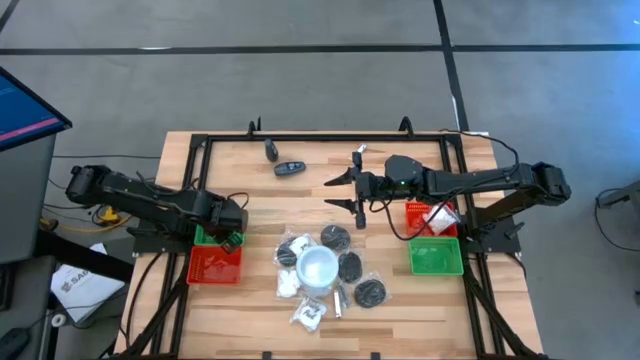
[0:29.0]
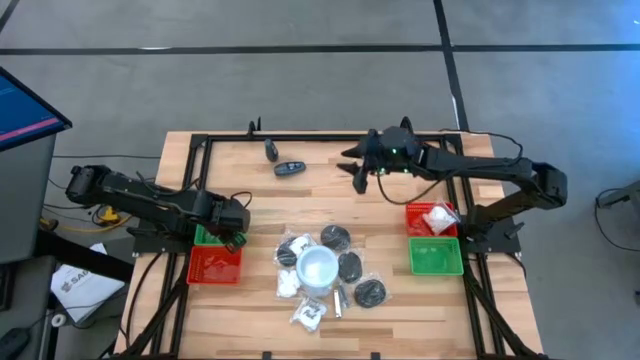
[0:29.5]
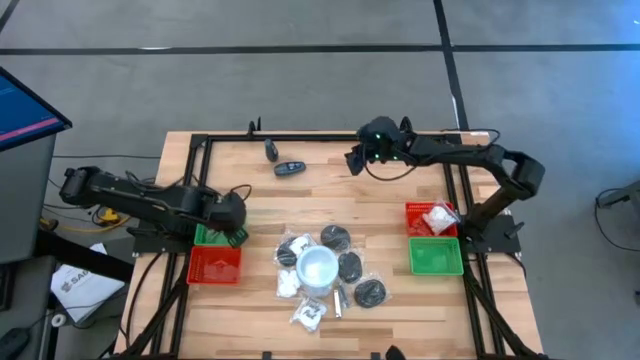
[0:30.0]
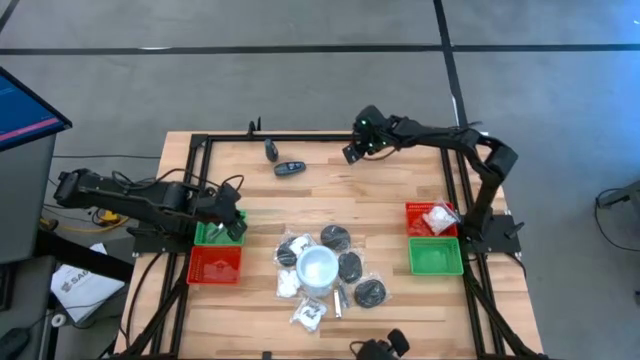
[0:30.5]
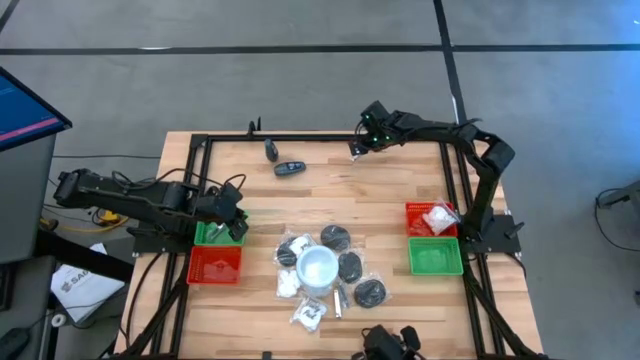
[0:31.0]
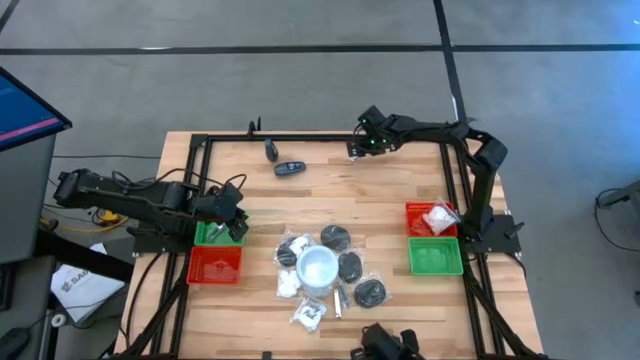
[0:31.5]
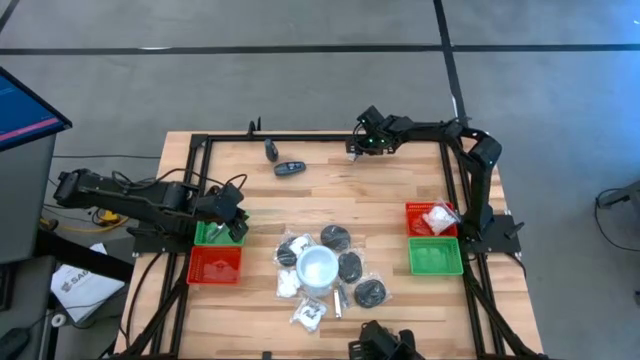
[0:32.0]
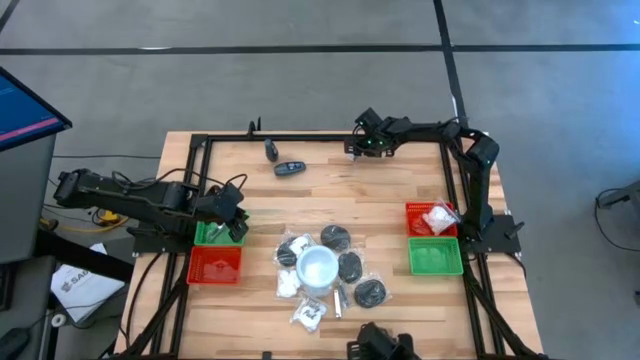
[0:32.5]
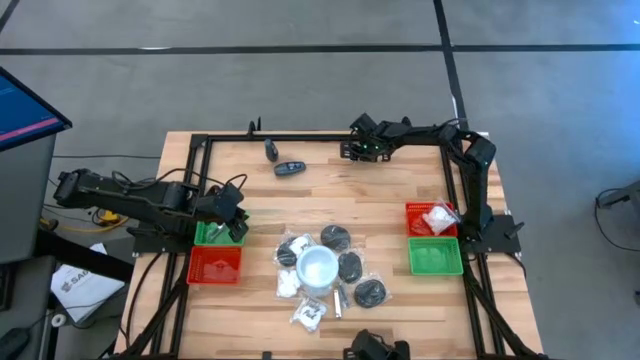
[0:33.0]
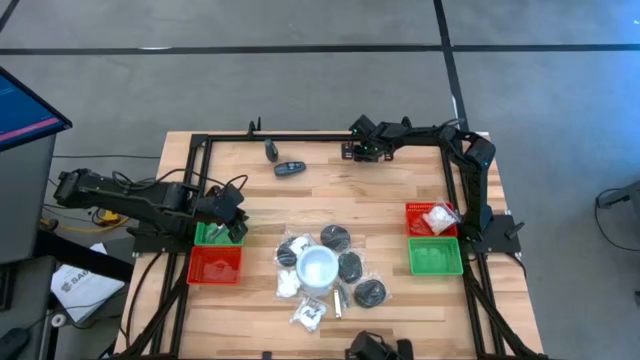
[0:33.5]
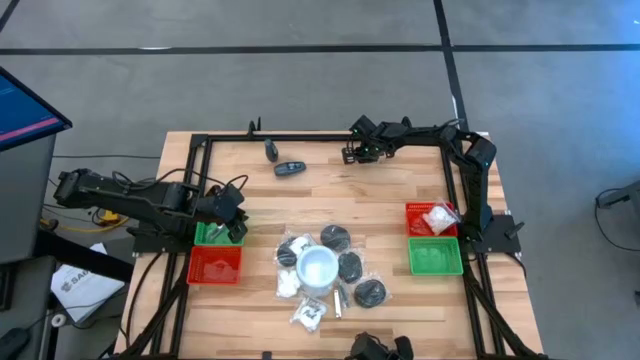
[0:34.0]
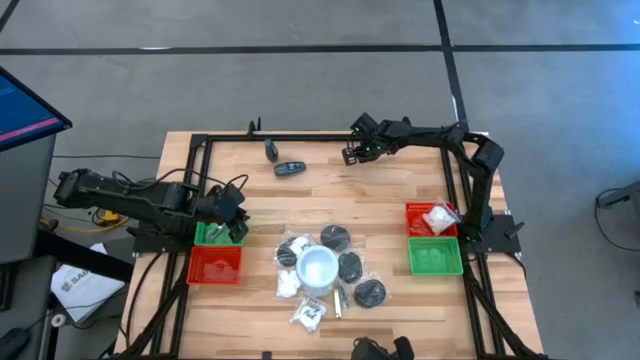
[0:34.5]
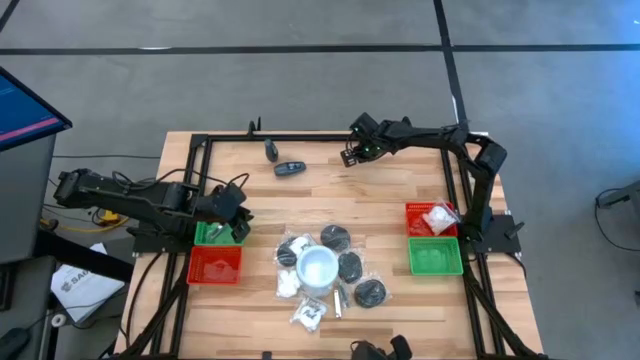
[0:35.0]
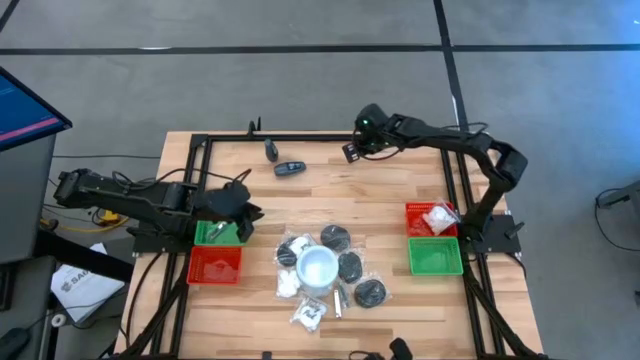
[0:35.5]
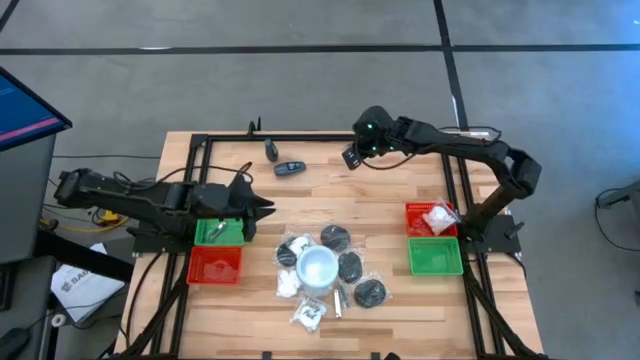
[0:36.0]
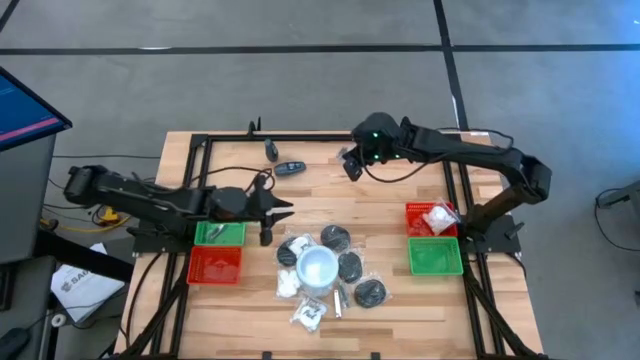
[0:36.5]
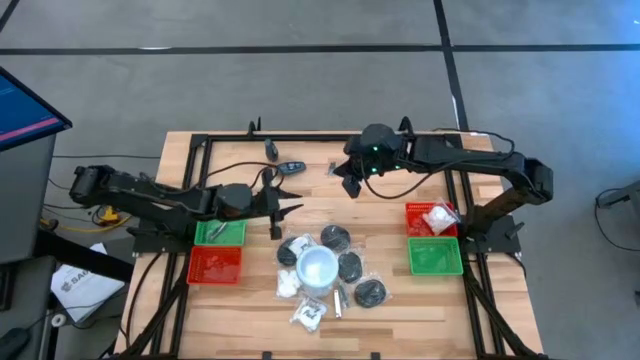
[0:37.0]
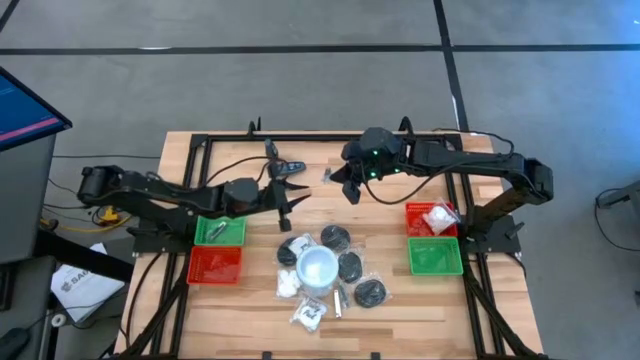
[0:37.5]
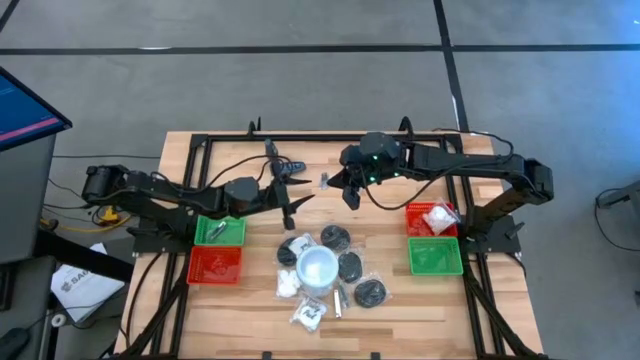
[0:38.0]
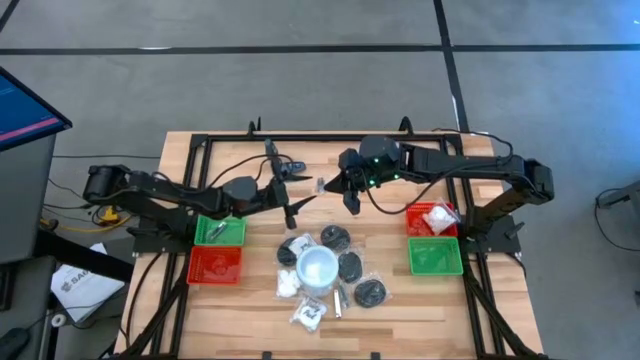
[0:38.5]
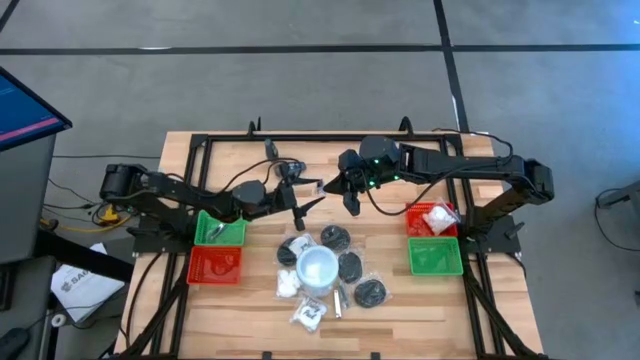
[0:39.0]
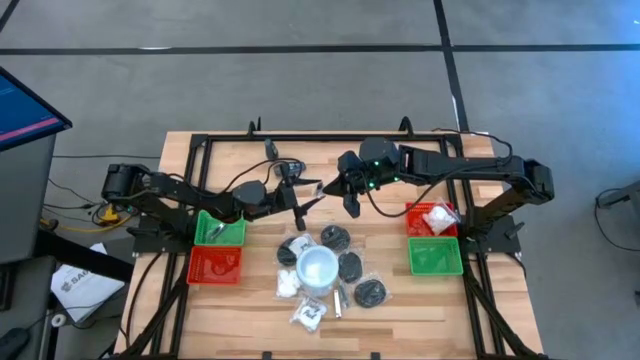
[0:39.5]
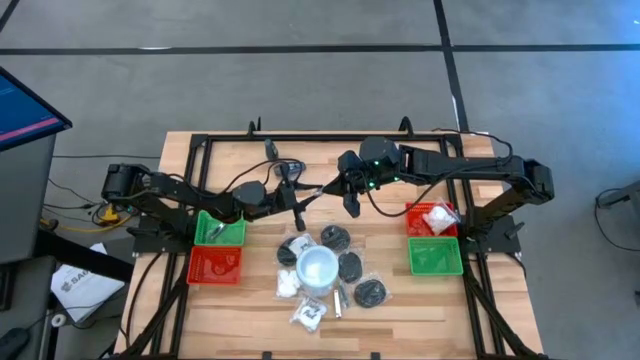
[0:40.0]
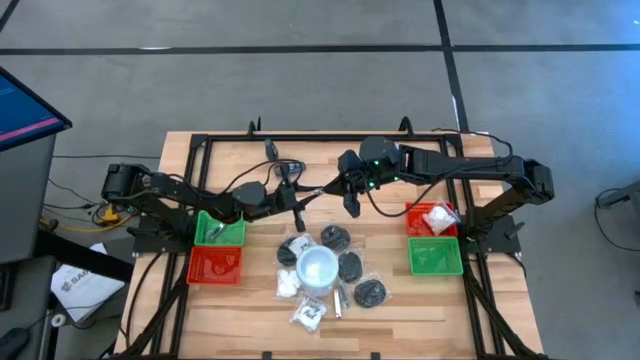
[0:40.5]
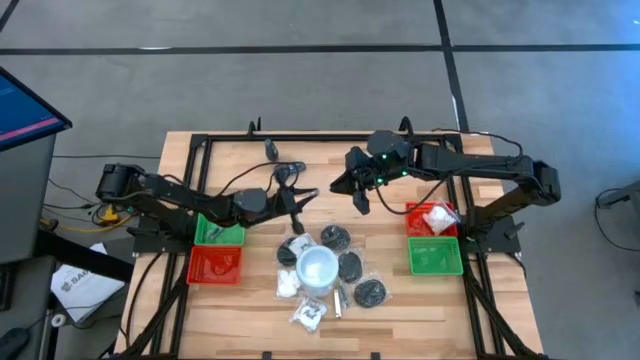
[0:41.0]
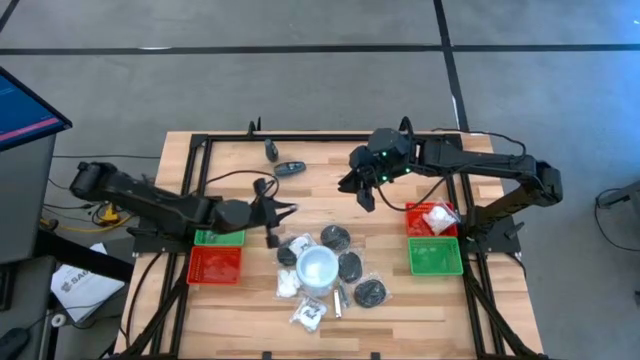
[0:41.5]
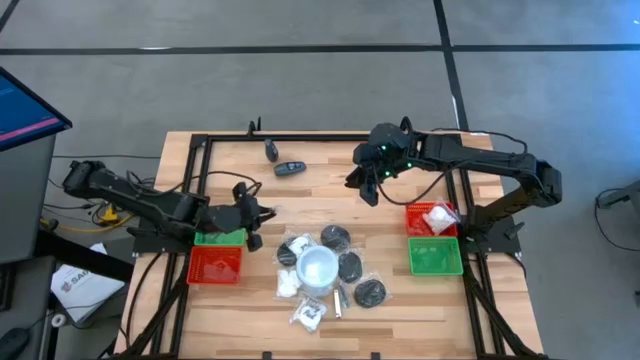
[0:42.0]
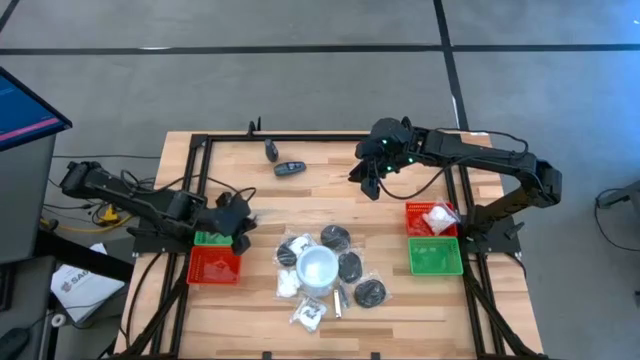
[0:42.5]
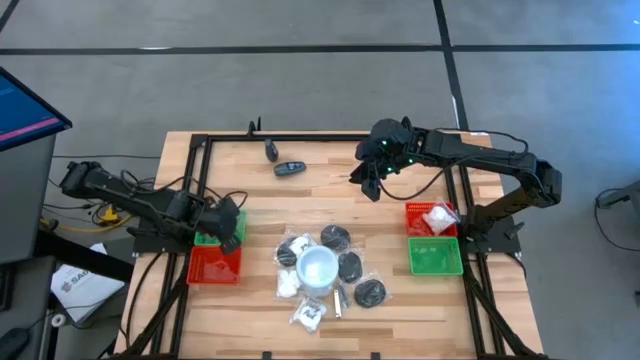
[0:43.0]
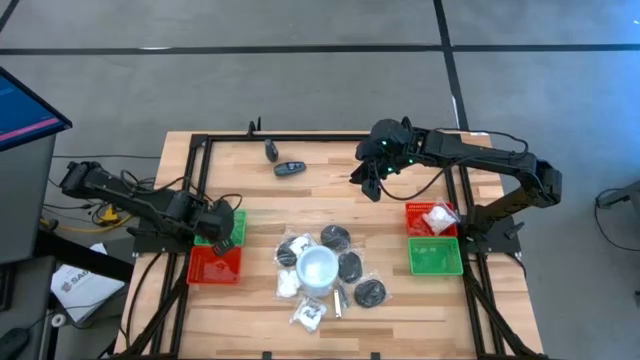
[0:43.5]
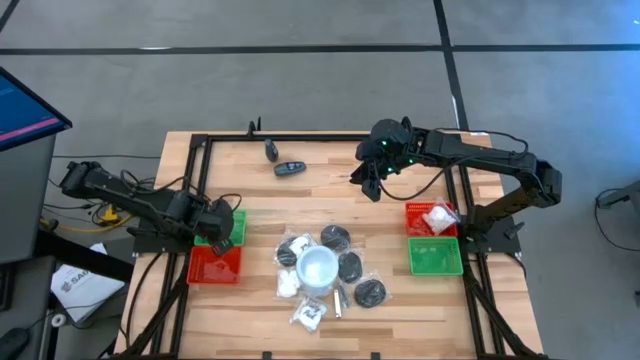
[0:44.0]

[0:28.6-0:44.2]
Task: Pick & Place Travel size toiletries
Put the nail cutter into the left green bin

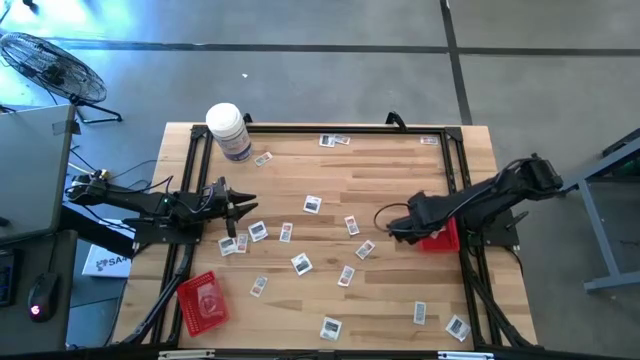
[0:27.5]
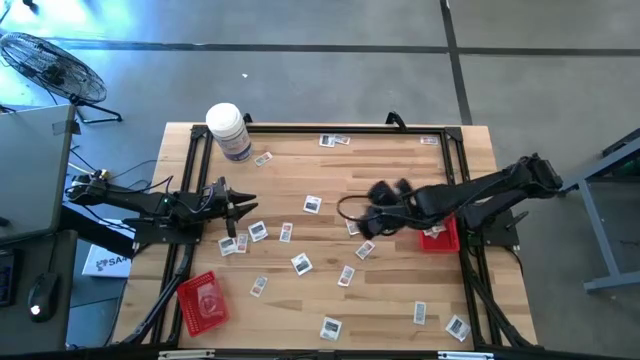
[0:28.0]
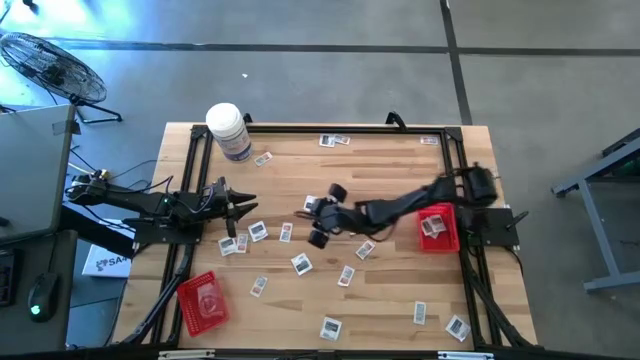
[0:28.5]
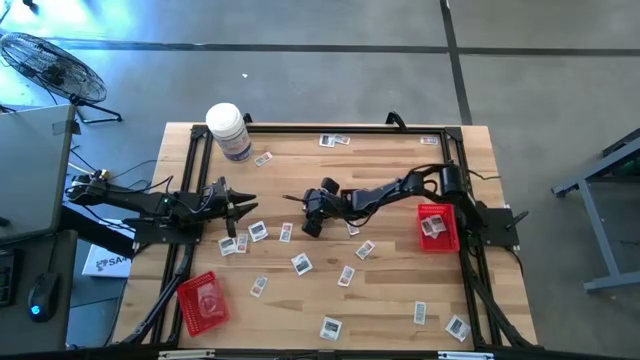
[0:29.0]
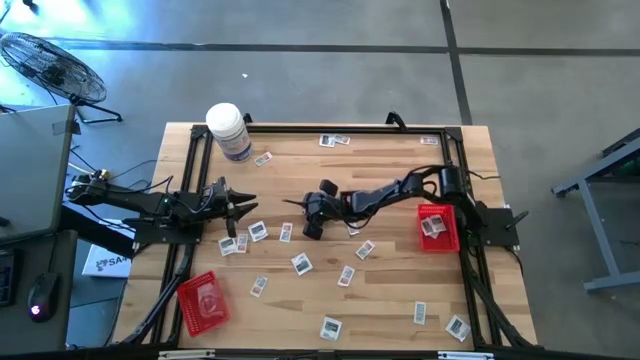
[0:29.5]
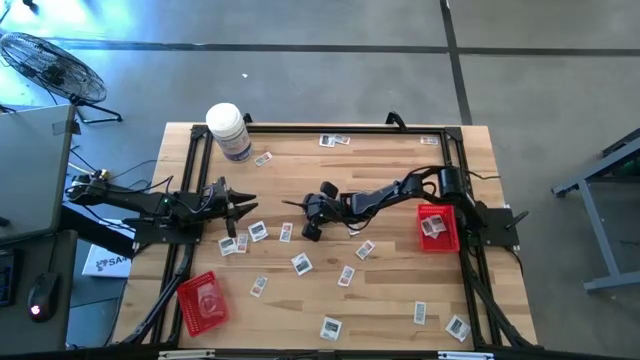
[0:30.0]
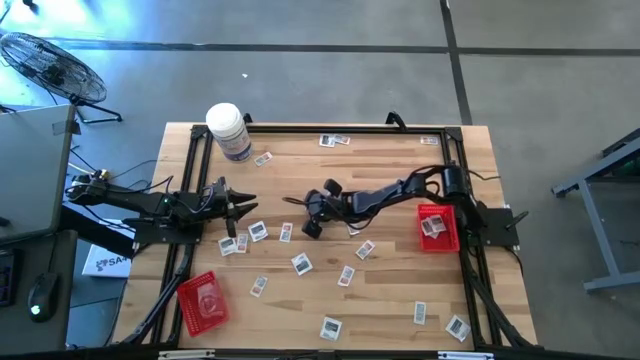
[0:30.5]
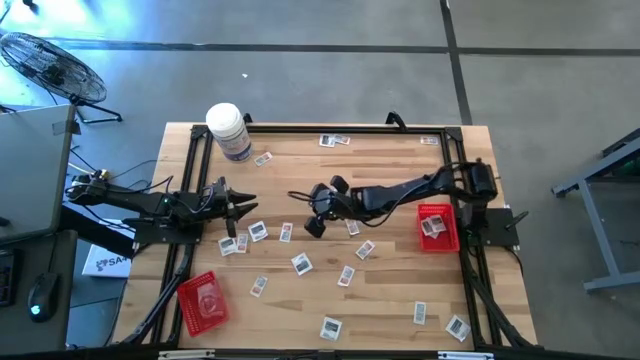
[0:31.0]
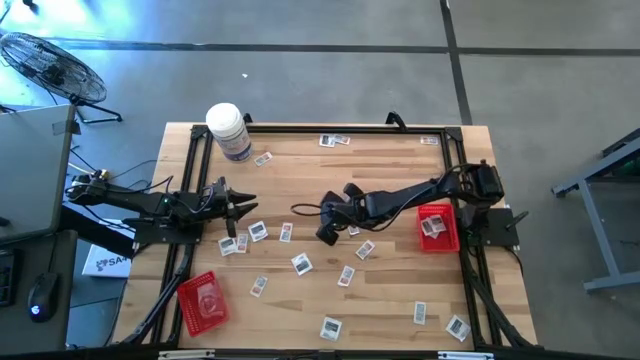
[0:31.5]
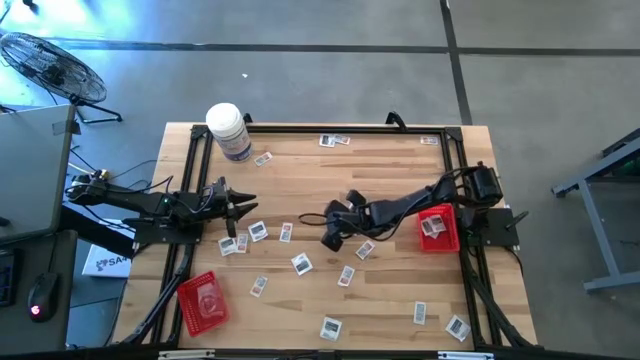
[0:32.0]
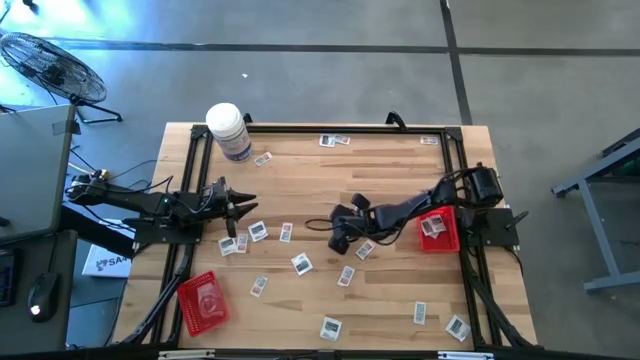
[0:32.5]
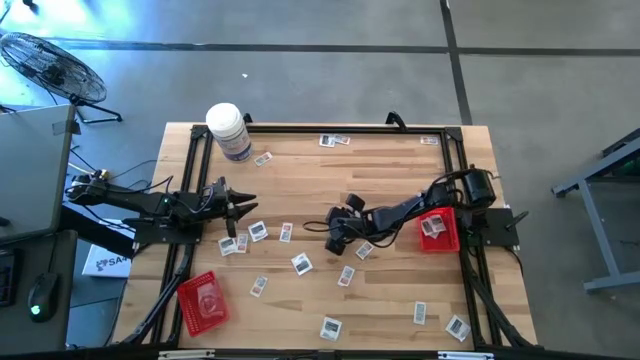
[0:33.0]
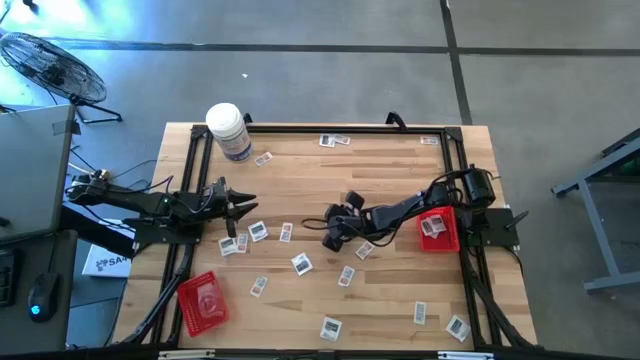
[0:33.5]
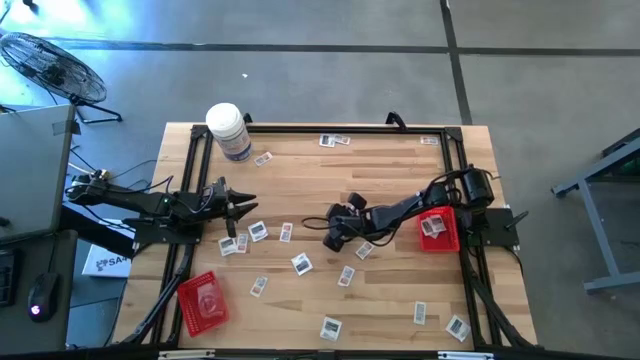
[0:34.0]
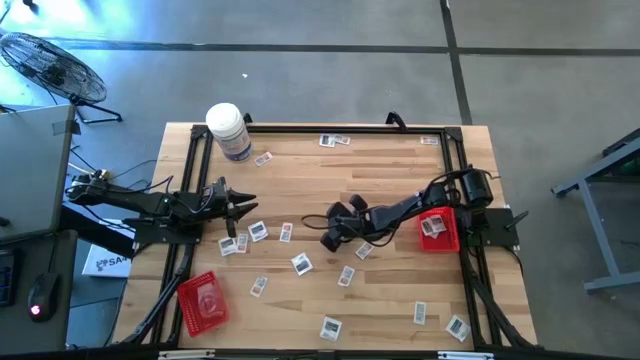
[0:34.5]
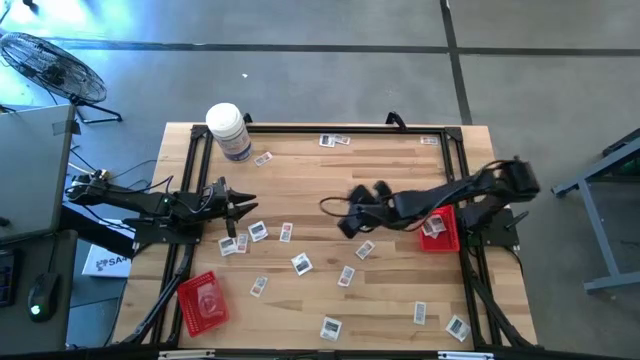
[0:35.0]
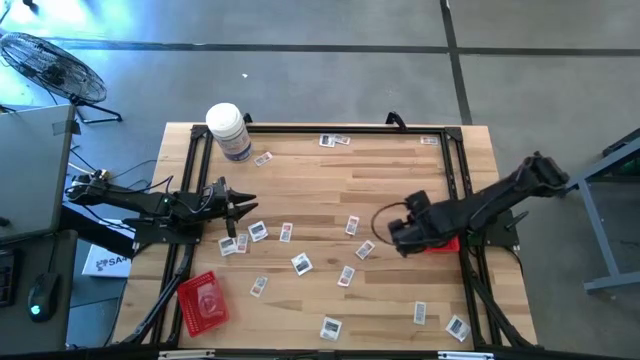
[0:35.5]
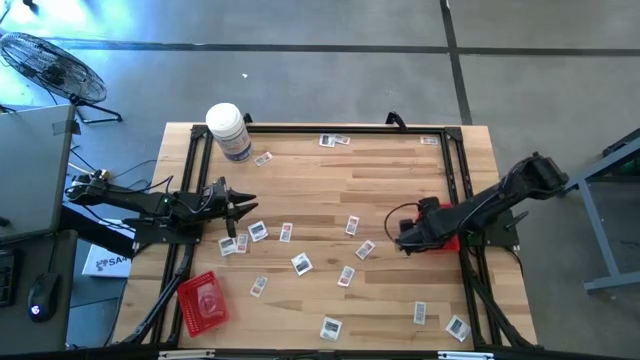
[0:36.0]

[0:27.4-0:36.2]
Task: Pick & Place First Aid Supplies
Put the towelette pack into the right red bin
